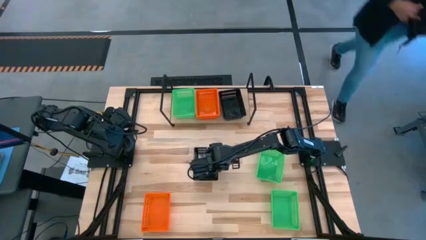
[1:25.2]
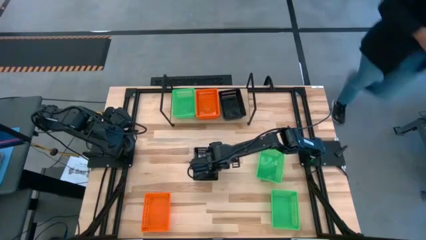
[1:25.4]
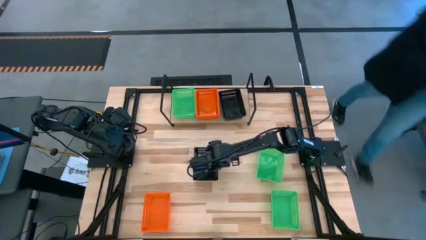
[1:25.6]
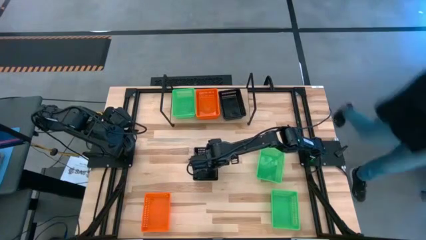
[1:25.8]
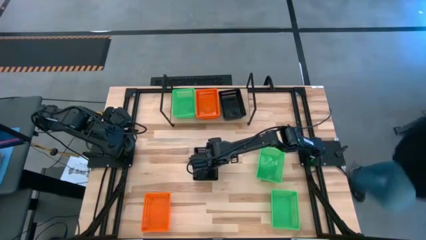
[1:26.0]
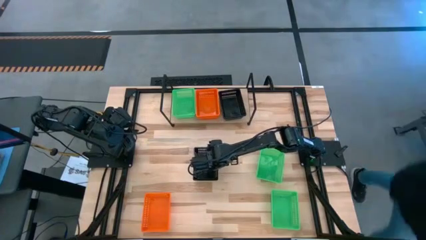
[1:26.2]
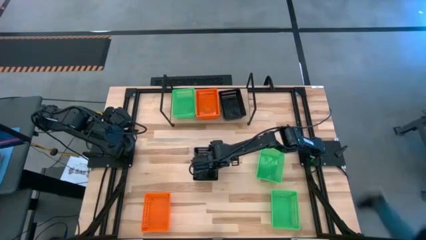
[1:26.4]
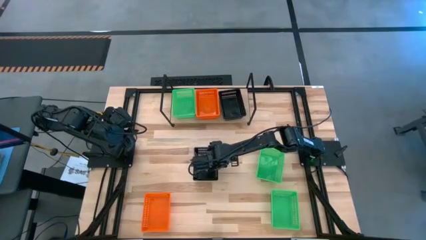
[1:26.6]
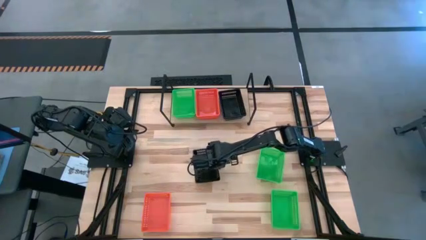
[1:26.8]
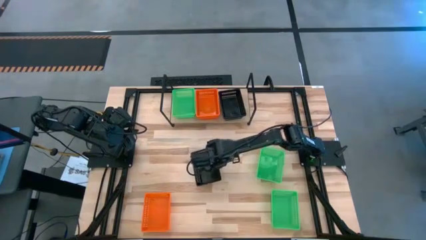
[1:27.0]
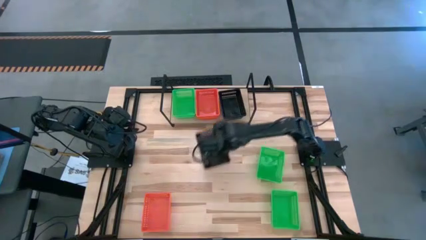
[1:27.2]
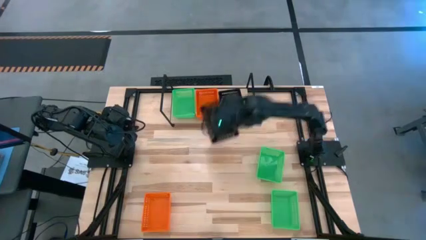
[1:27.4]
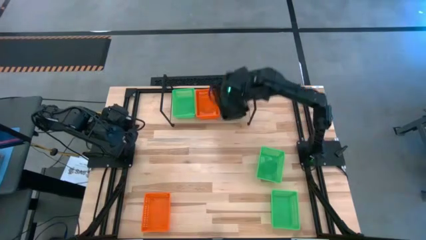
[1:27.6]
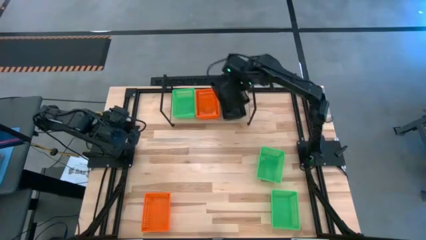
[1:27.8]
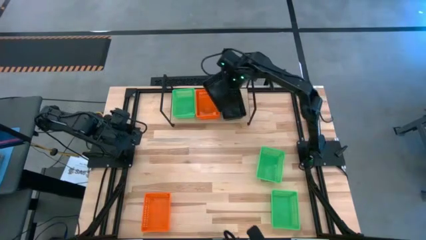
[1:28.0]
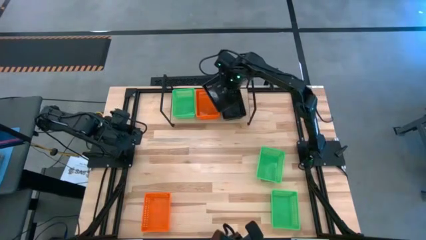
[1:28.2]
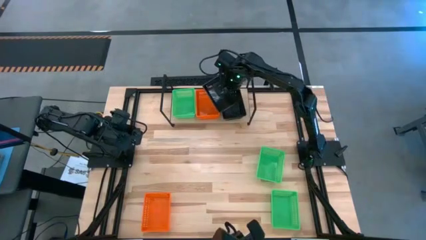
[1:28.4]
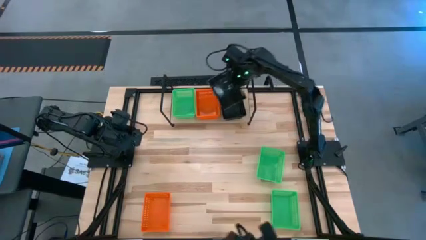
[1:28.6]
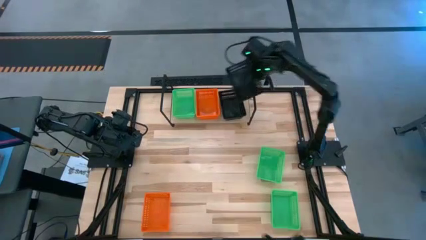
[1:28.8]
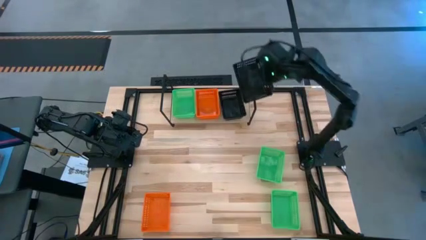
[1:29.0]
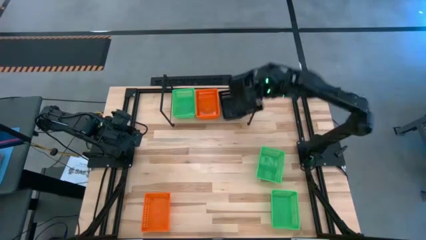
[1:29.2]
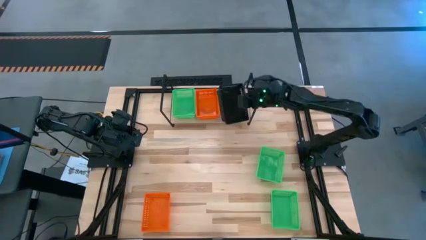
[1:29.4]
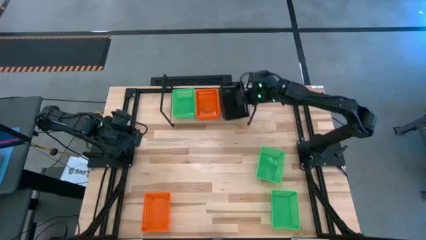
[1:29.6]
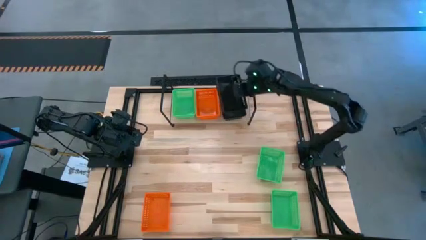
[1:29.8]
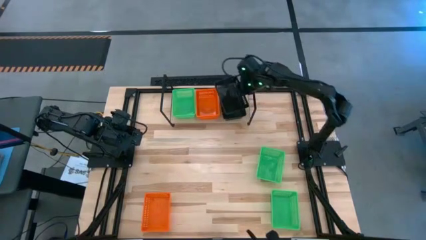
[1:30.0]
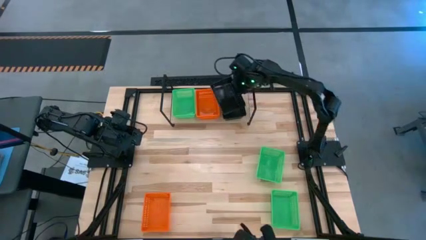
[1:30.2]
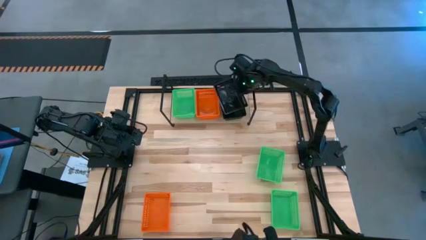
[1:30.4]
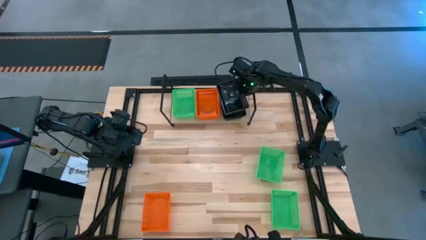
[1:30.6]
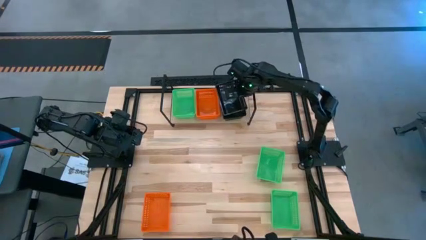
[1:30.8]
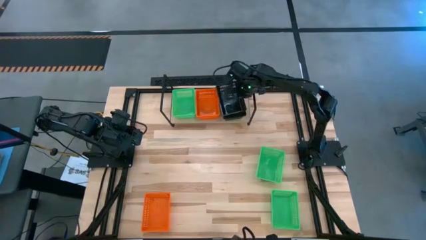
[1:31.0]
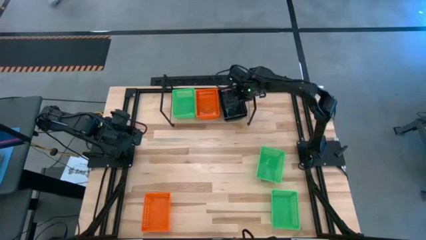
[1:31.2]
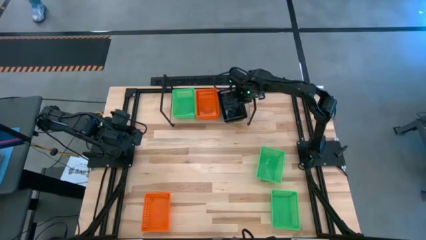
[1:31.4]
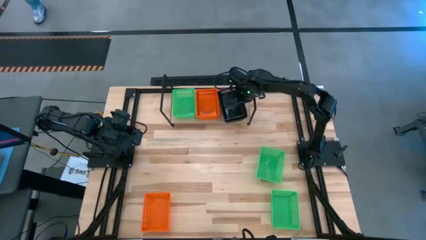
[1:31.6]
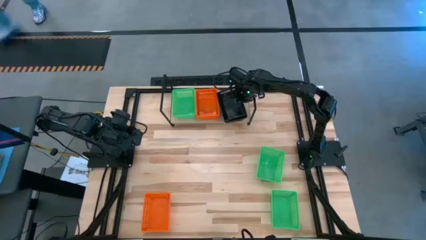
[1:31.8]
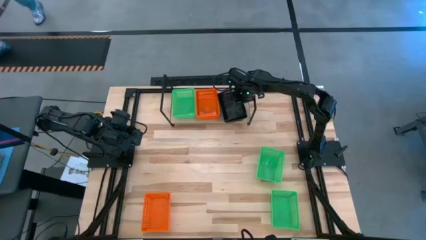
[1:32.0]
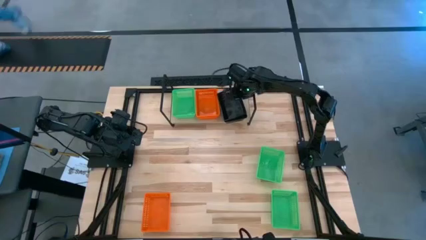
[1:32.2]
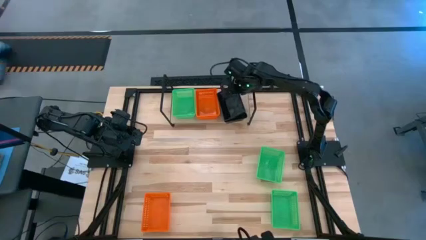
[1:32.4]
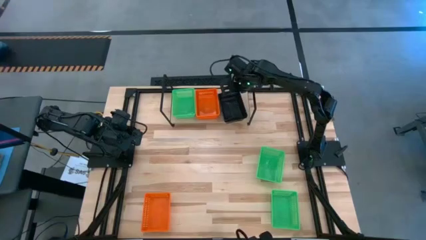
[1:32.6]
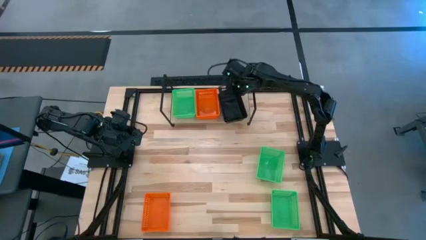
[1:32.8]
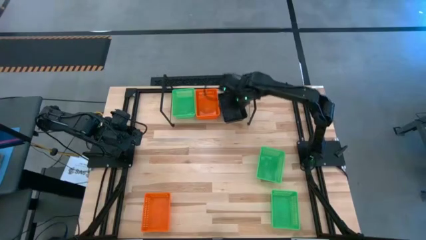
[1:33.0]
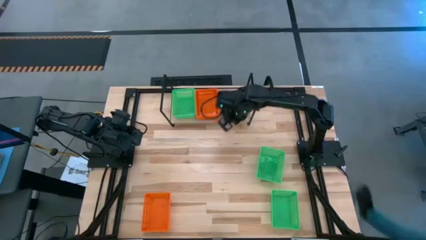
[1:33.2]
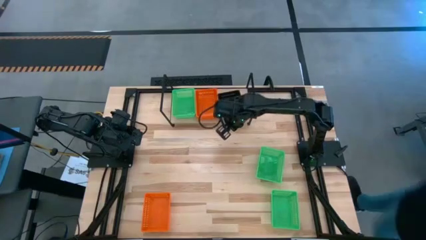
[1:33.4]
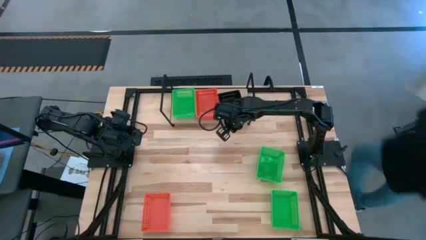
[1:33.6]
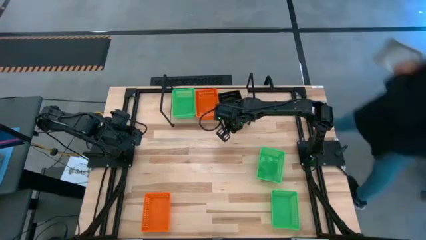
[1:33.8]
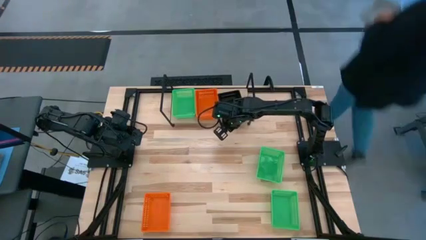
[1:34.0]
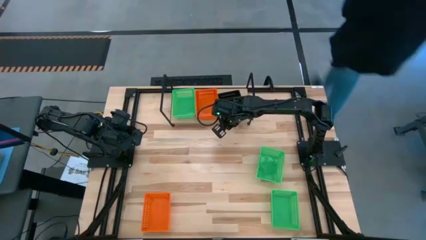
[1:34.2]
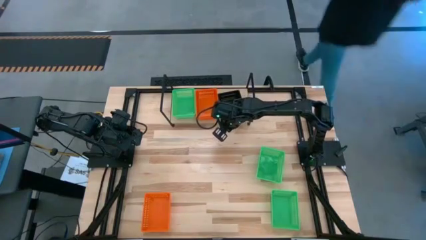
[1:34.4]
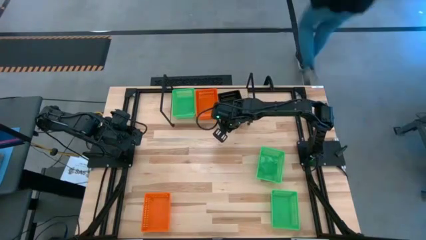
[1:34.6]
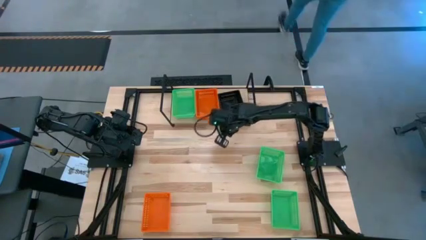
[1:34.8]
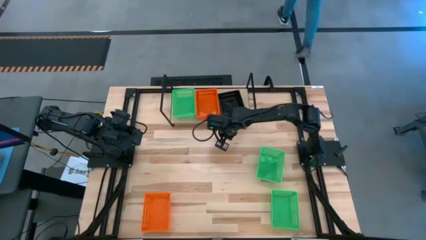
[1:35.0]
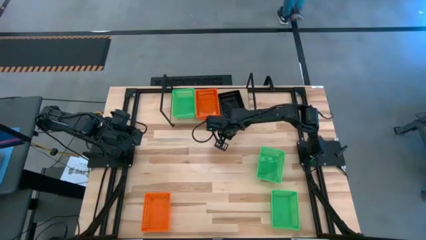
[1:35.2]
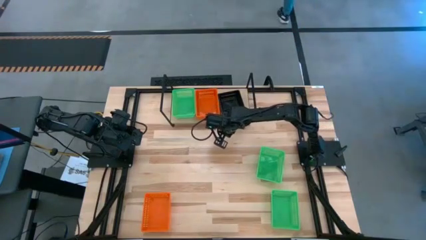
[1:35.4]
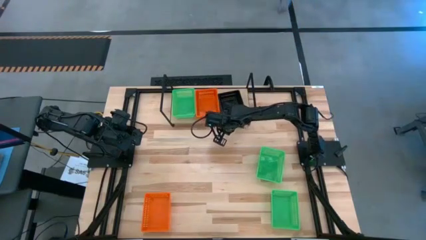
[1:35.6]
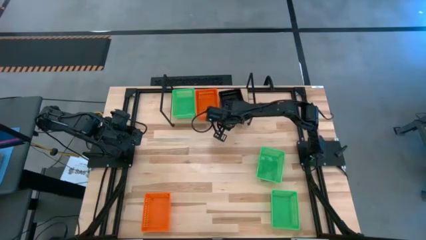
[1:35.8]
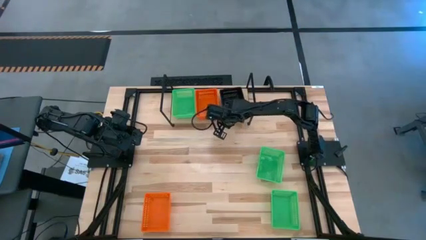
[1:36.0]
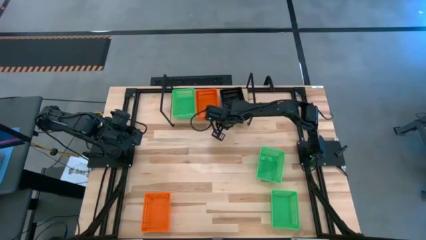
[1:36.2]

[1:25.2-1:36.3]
Task: Stack baskets on shelf by color
Stack the black bin on top of the black bin on the shelf

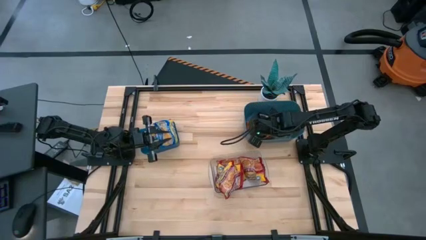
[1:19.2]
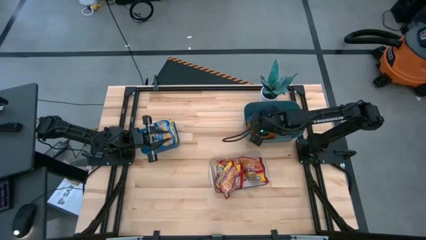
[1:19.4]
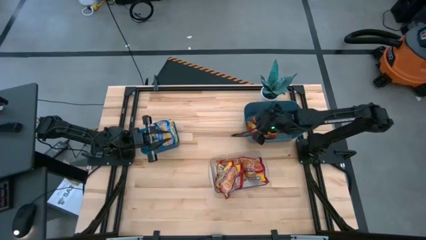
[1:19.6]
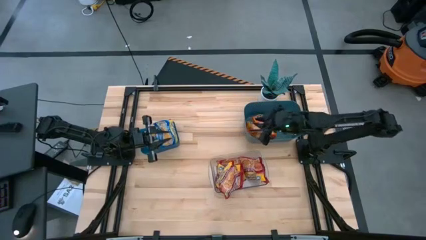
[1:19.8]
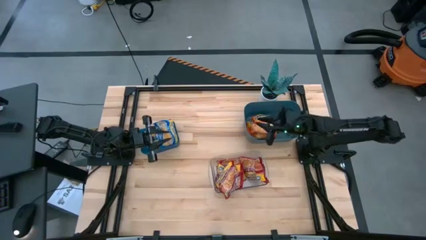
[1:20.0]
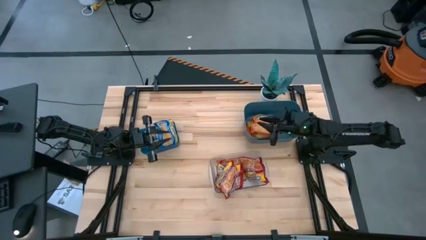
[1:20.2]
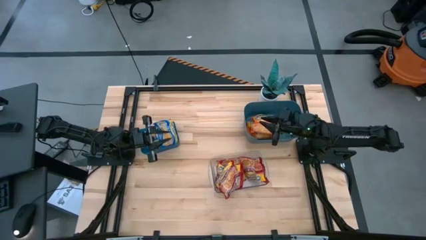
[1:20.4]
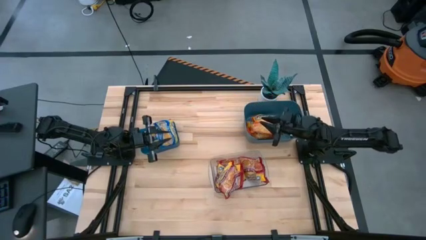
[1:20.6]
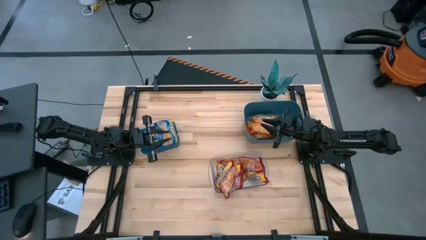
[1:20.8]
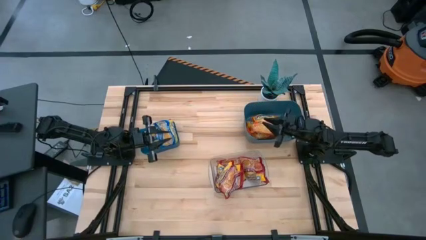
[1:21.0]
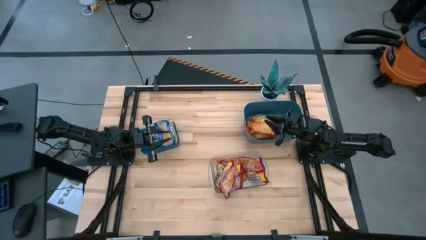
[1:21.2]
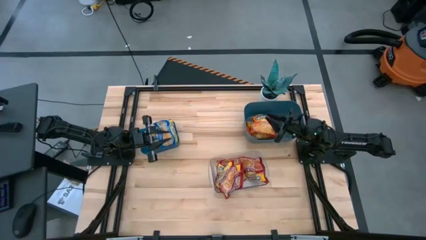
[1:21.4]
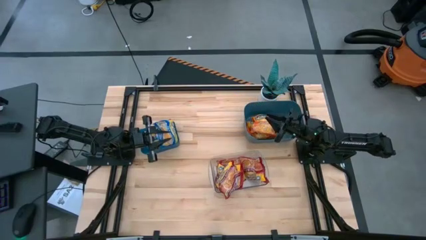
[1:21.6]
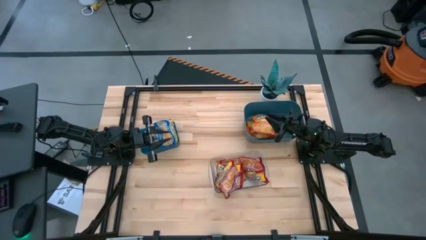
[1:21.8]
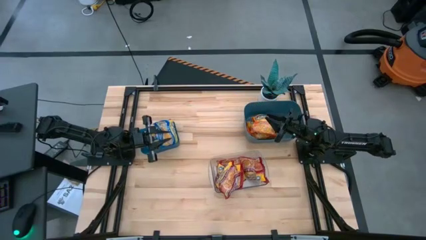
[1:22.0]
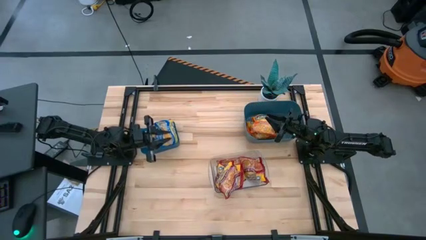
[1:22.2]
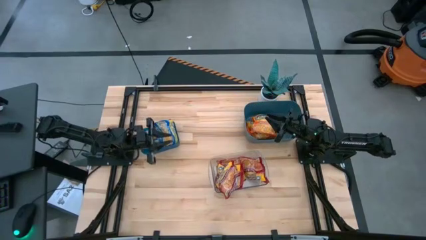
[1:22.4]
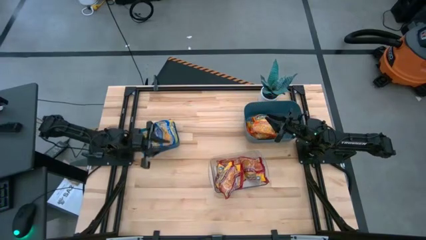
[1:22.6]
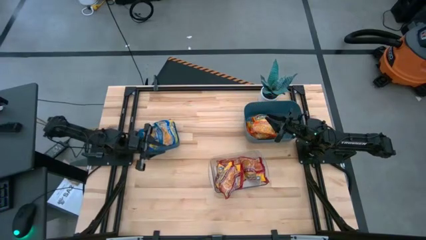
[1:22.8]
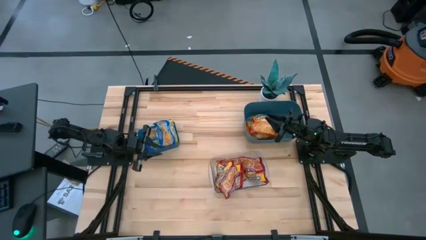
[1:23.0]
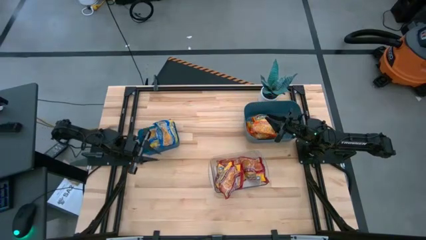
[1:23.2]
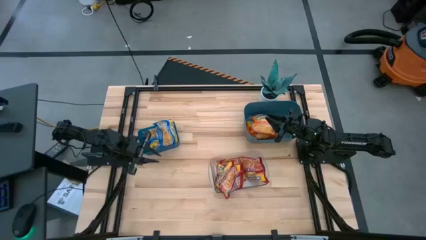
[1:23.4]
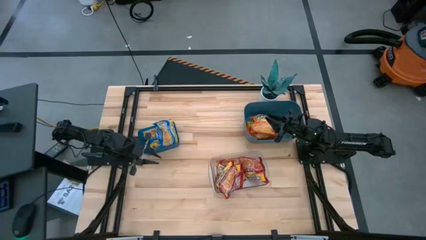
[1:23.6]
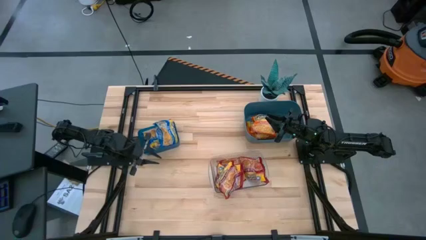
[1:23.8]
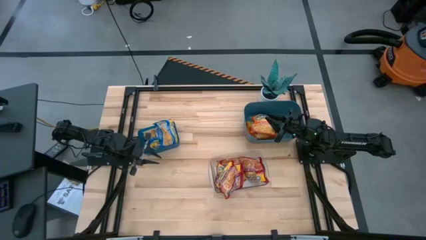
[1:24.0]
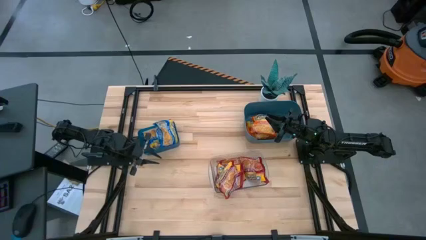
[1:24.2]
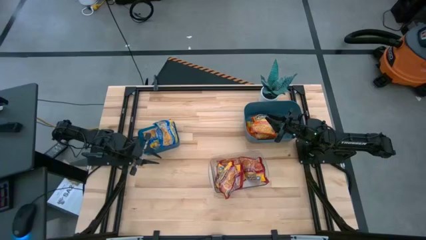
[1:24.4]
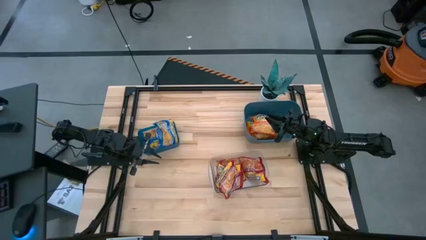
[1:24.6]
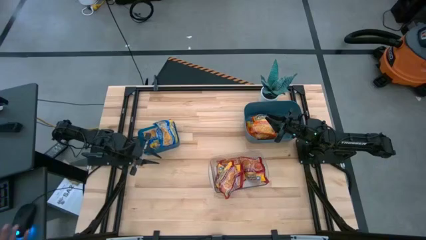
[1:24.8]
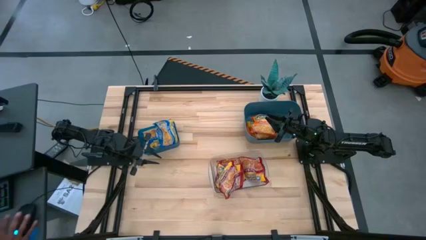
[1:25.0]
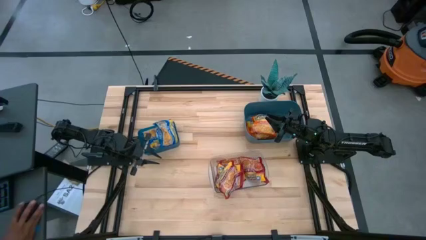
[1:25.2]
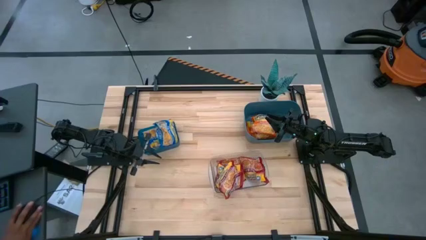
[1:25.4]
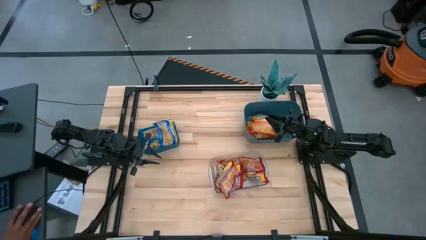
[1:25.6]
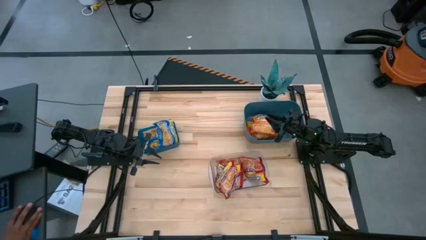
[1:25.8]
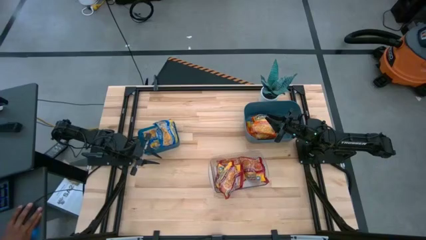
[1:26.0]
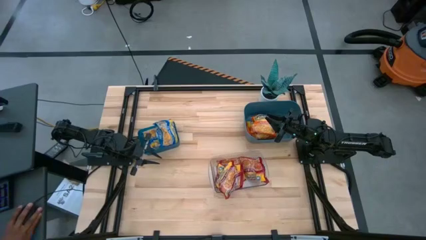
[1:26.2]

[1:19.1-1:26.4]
Task: Sort Maruchan noodles
Return to Home Position
